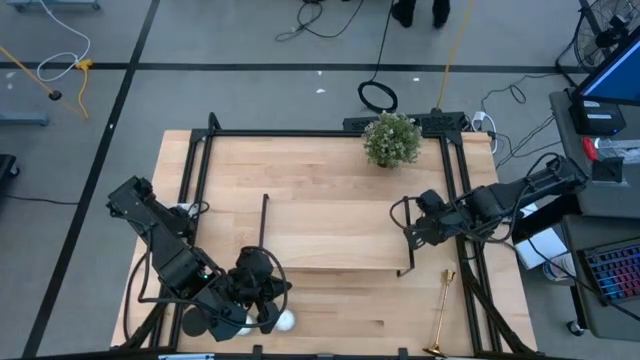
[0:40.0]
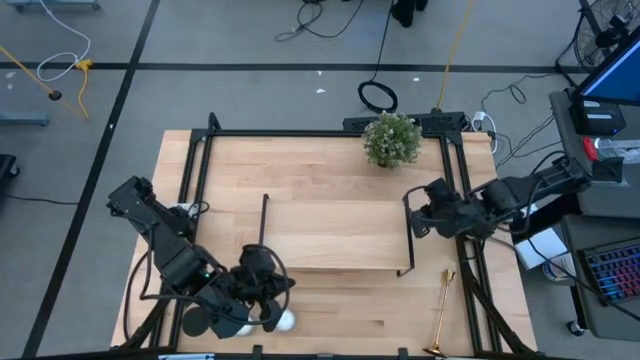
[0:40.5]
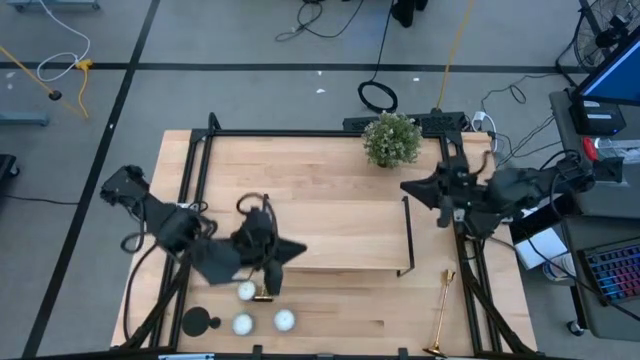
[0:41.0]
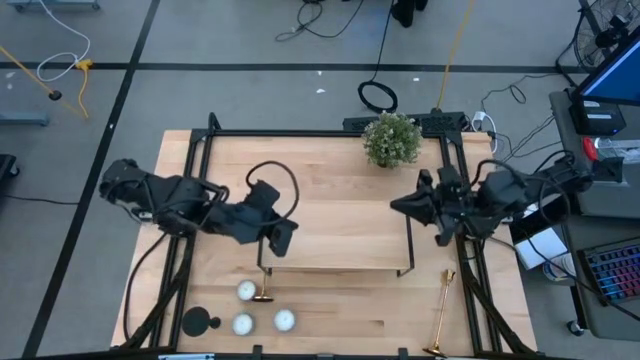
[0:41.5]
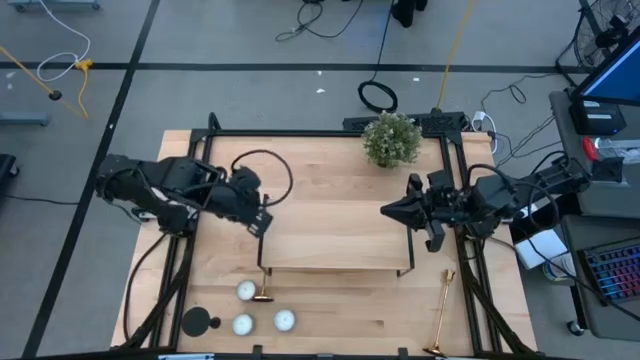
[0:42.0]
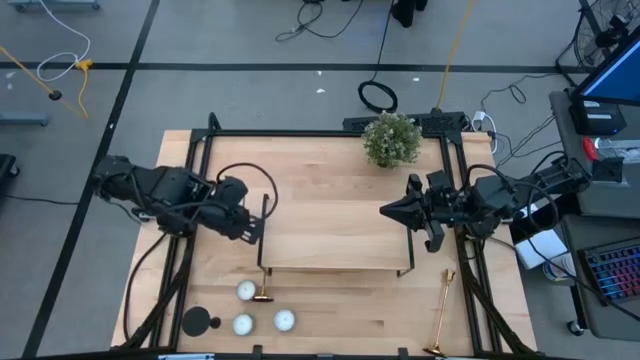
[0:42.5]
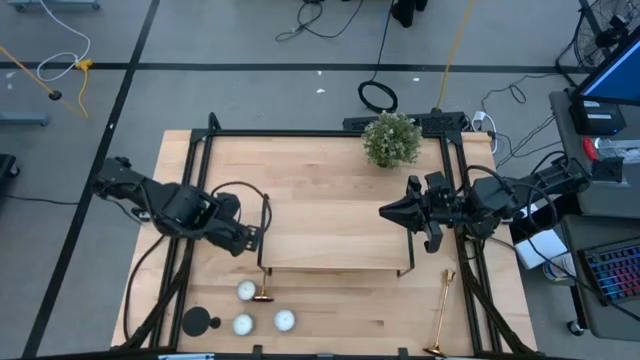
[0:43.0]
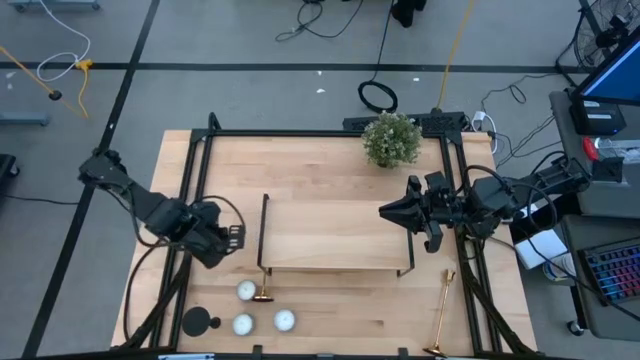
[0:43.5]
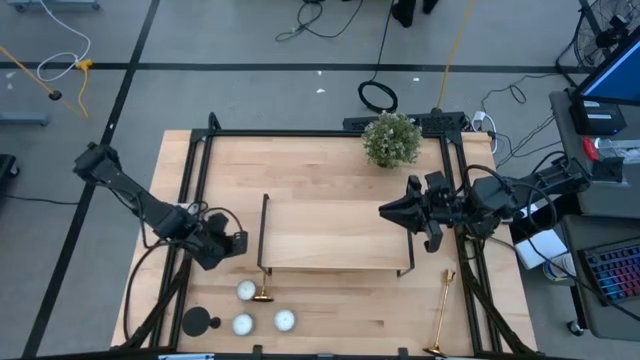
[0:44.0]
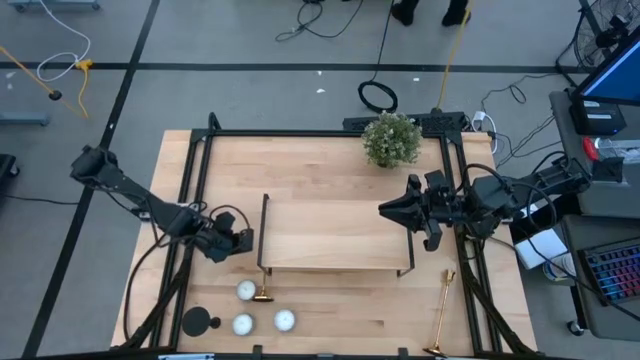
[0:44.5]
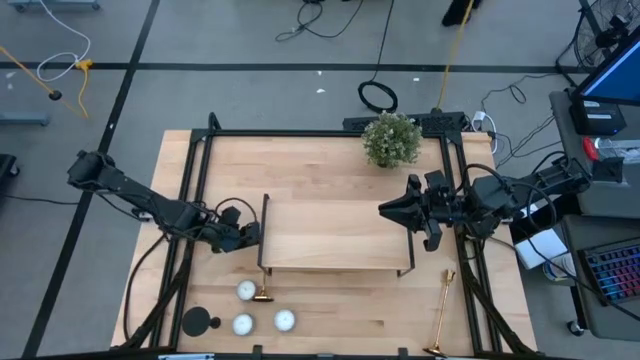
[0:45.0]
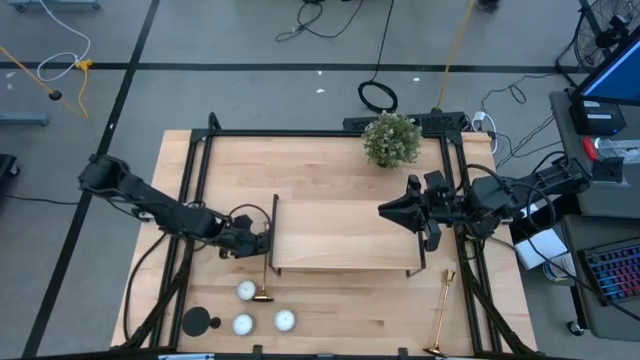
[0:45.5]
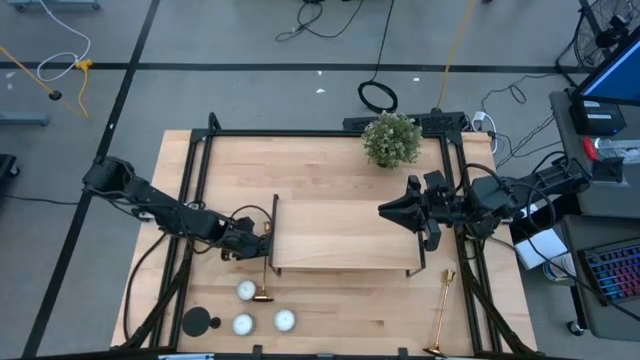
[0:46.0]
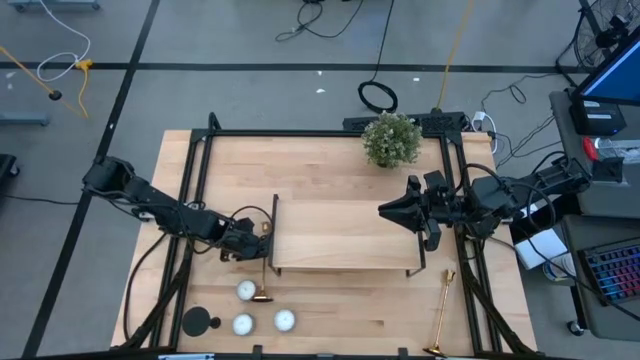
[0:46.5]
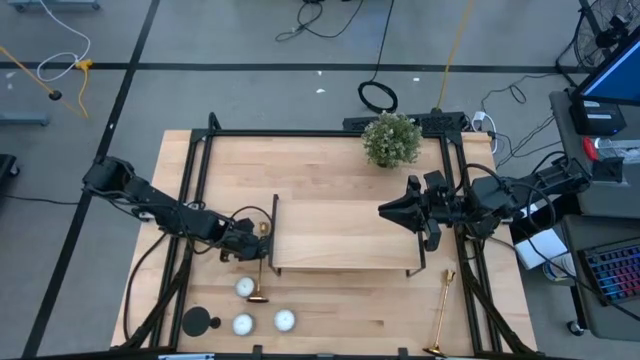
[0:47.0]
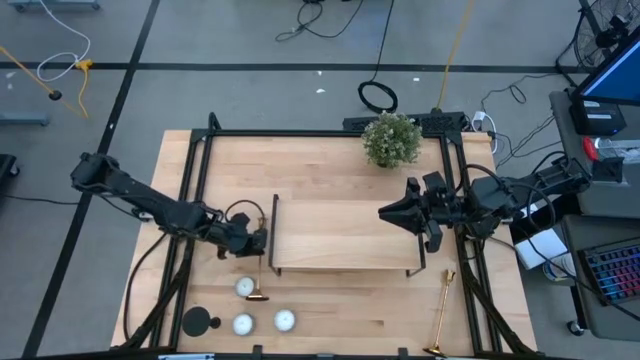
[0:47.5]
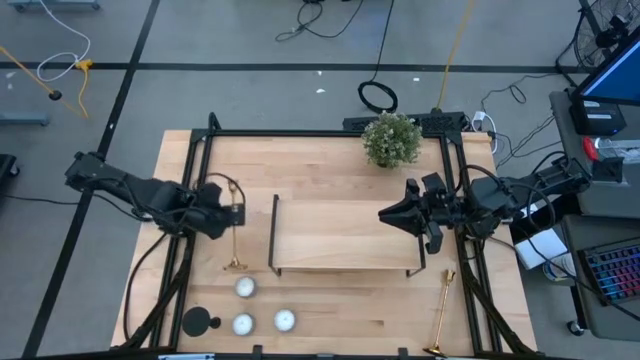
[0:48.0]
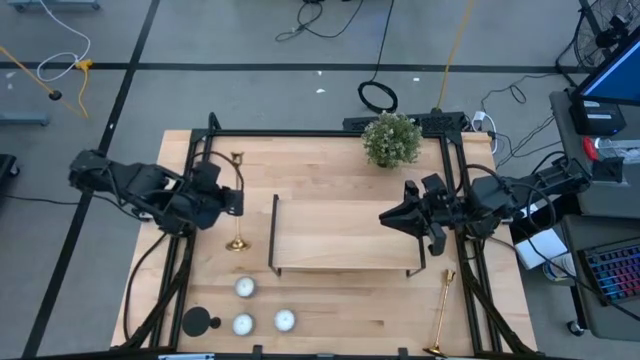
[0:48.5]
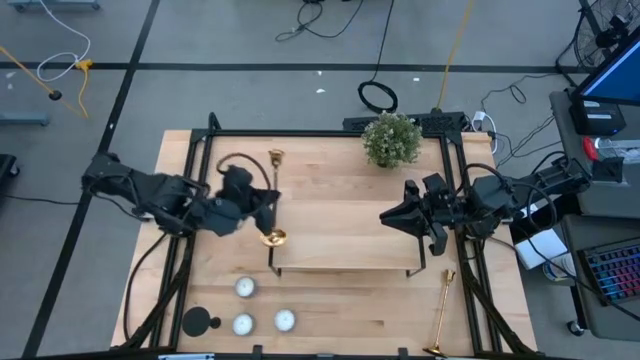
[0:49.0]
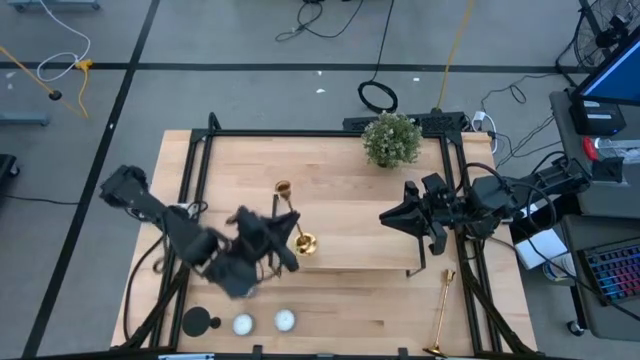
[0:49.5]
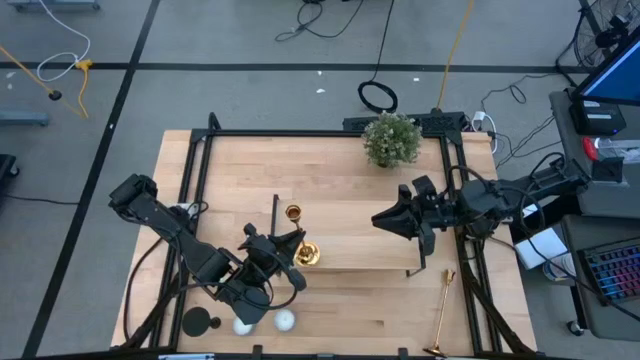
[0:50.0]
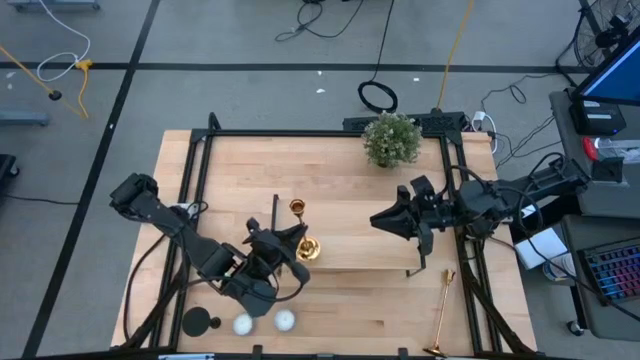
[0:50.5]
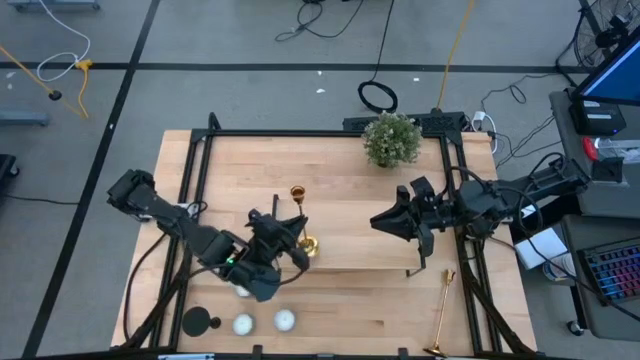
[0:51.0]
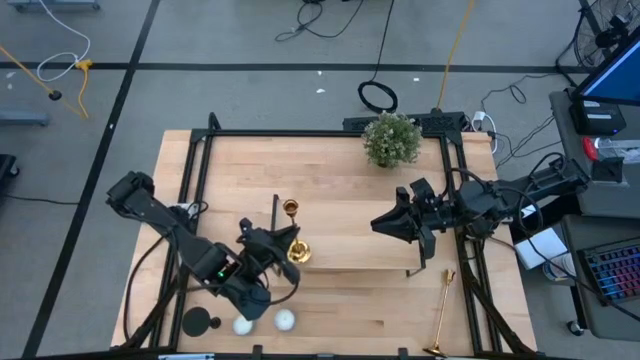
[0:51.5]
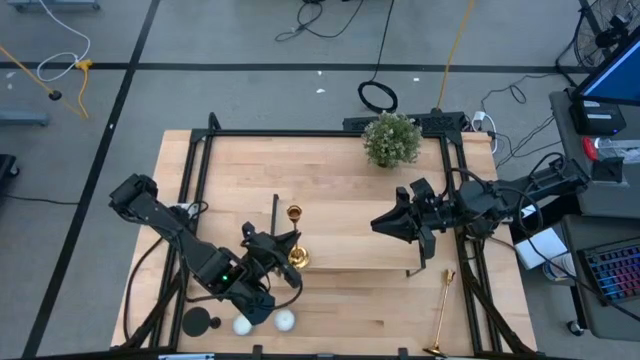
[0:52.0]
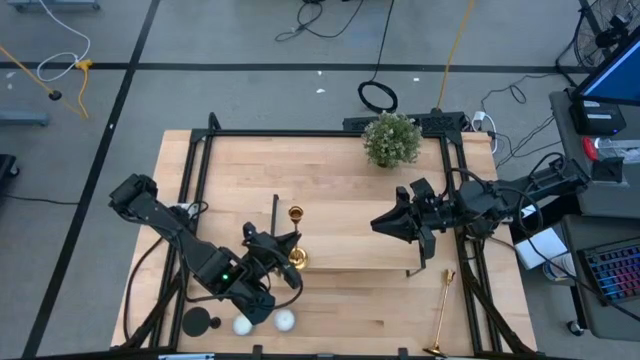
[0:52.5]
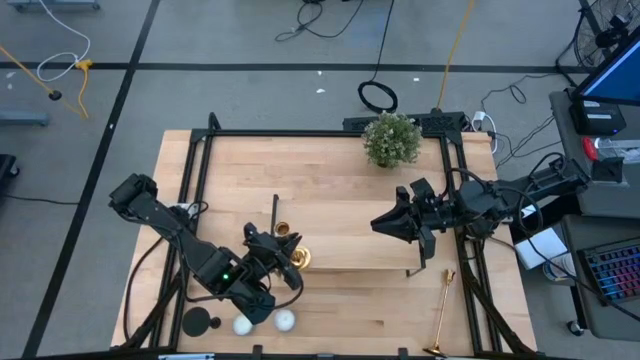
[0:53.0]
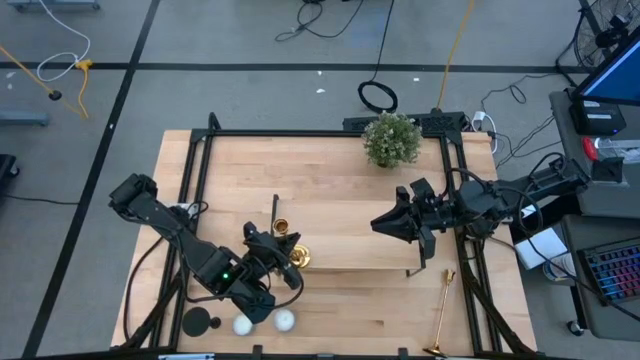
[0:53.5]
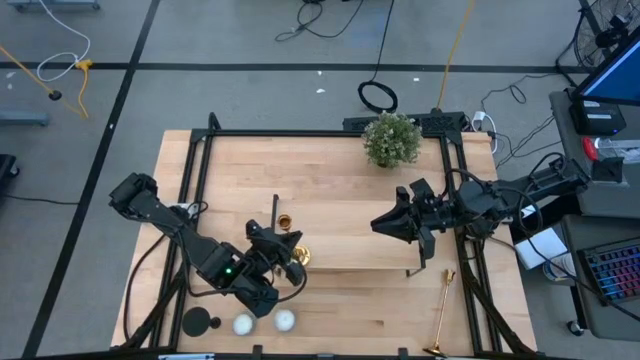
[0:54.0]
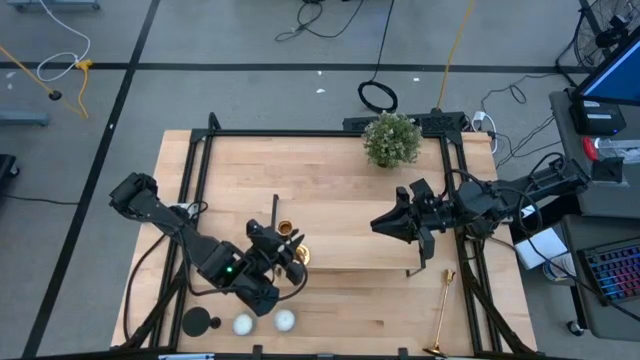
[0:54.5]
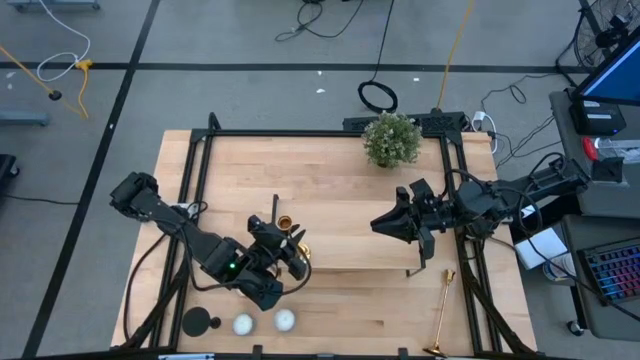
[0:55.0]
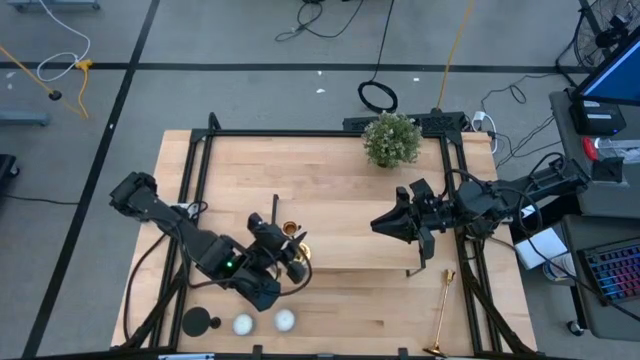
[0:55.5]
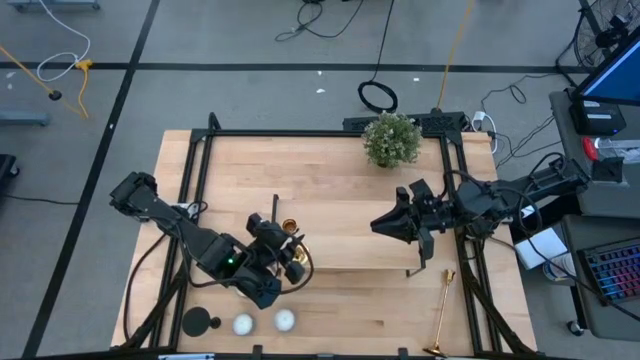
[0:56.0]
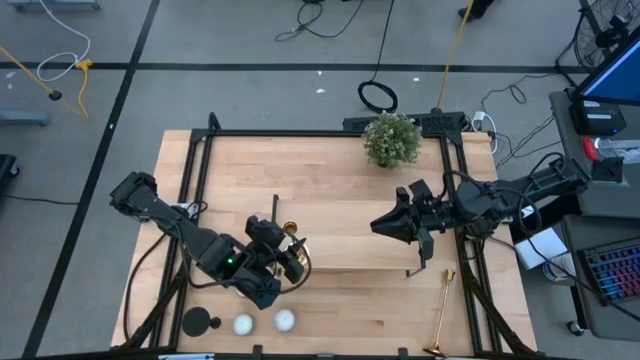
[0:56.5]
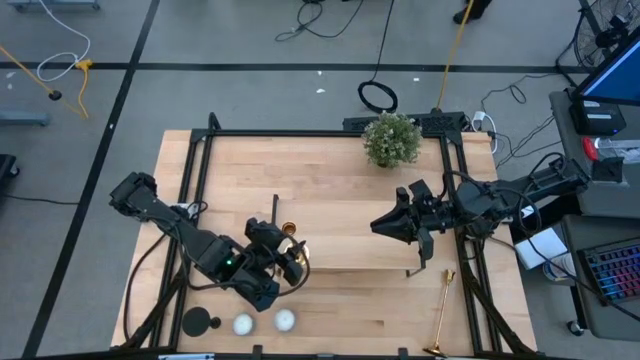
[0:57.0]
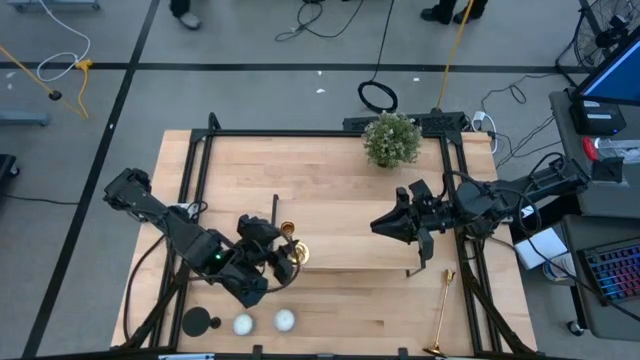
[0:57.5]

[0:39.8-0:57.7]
Task: Pick & Place candle stick holders
Put the left golden candleholder on the shelf

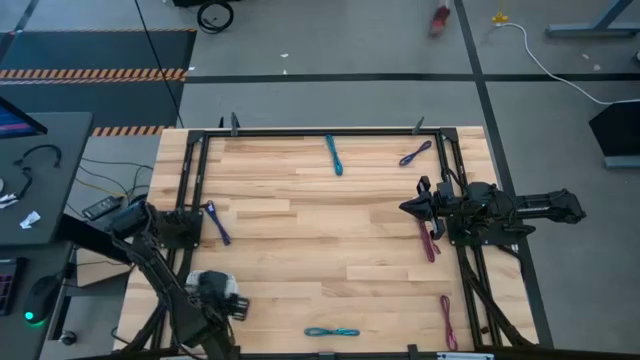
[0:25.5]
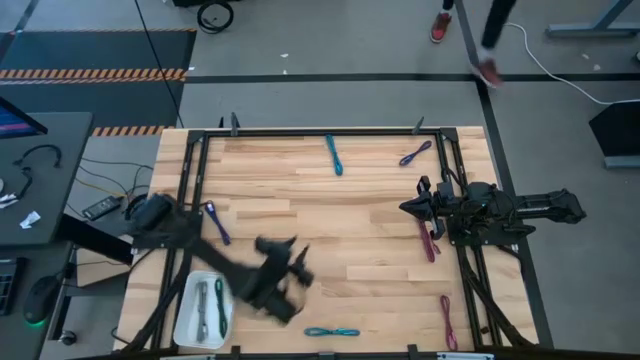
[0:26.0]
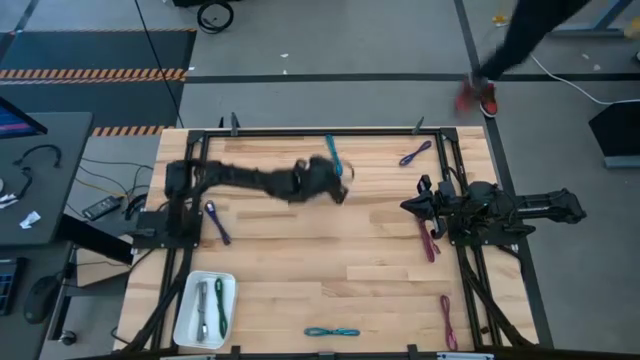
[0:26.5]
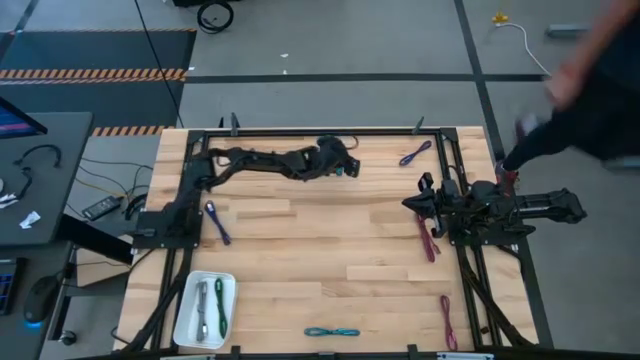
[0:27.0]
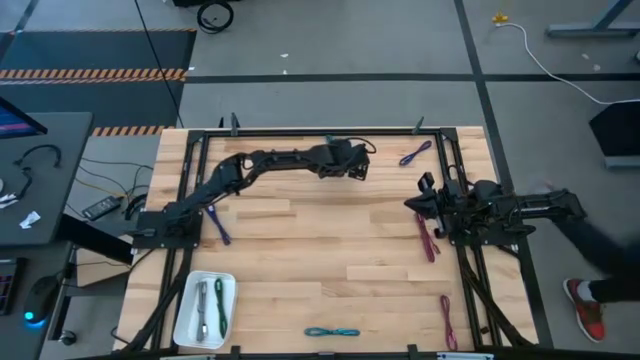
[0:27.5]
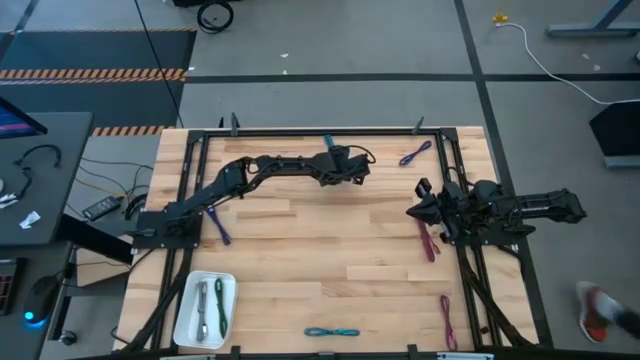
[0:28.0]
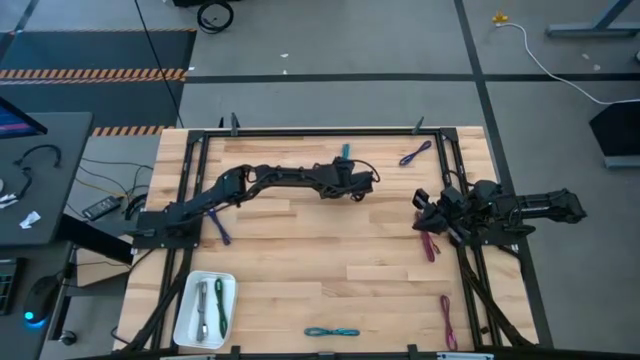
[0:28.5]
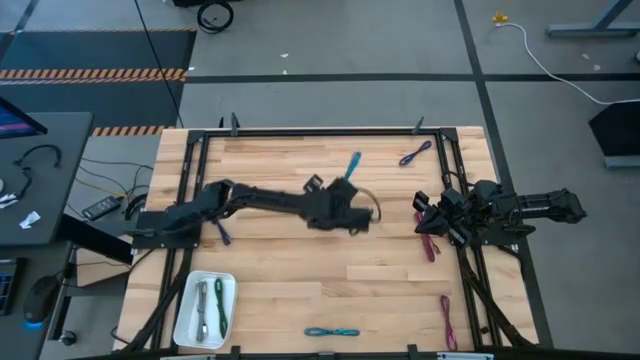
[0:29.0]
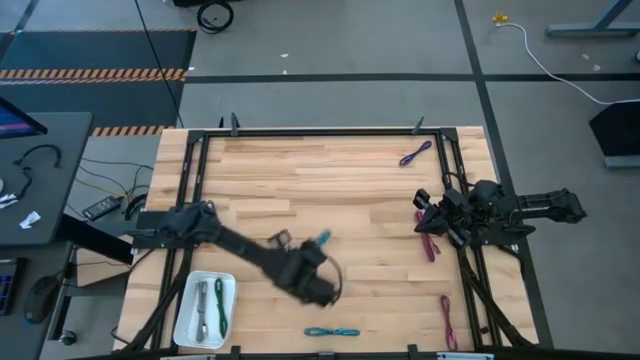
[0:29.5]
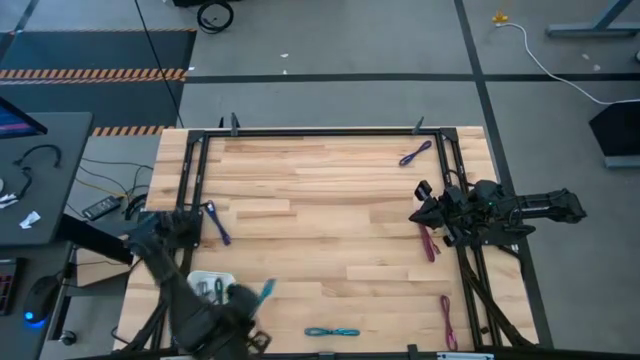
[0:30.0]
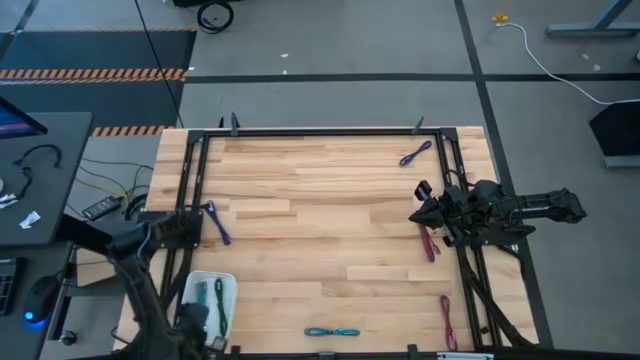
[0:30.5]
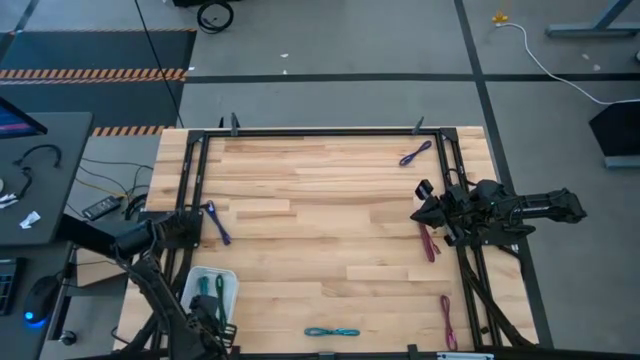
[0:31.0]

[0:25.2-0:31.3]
Task: Pick and place USB-C Cables
Put the top light blue charger cable into the white bin
